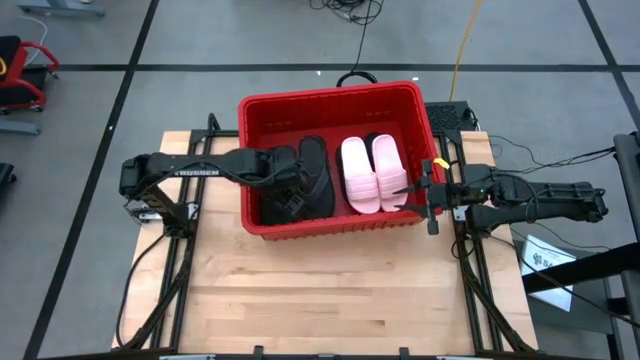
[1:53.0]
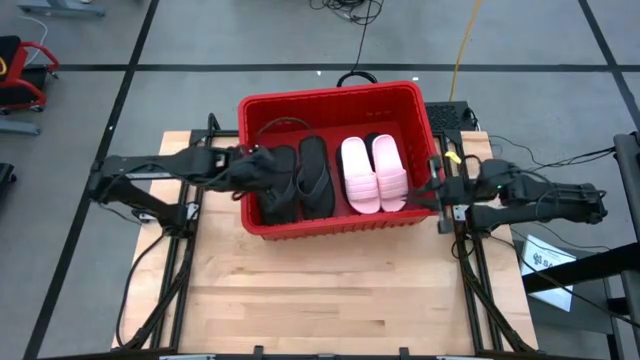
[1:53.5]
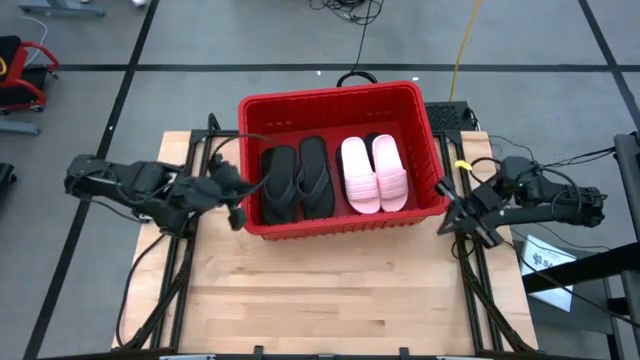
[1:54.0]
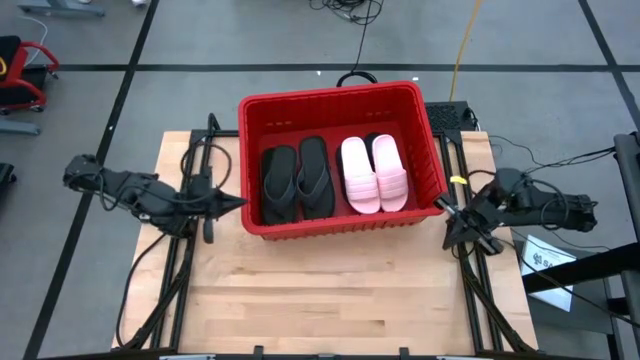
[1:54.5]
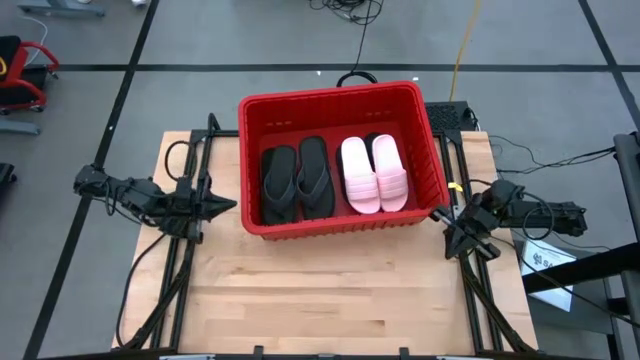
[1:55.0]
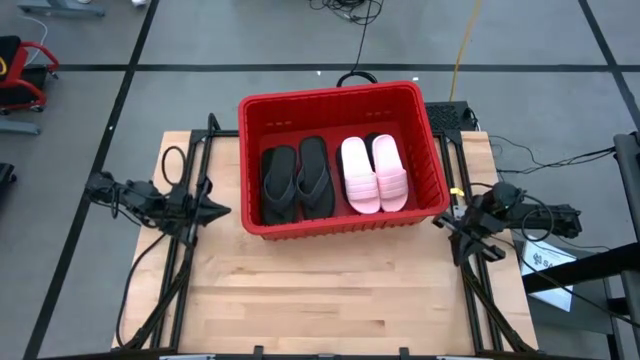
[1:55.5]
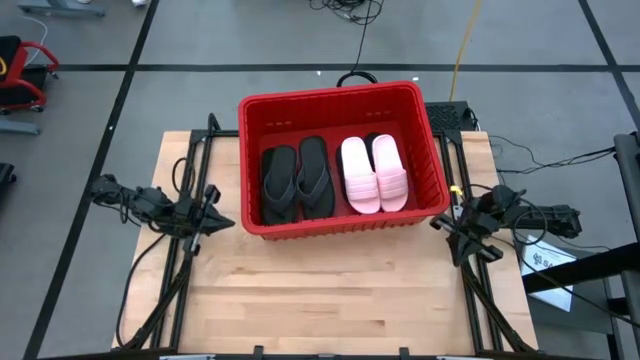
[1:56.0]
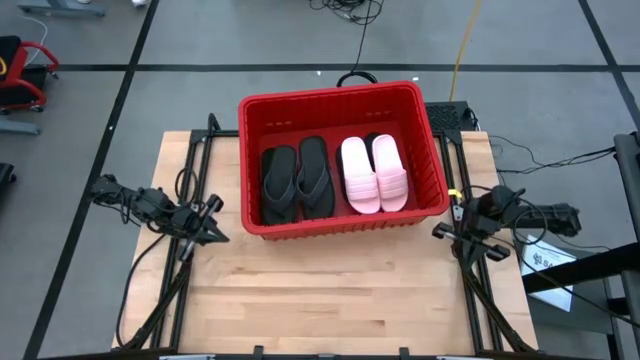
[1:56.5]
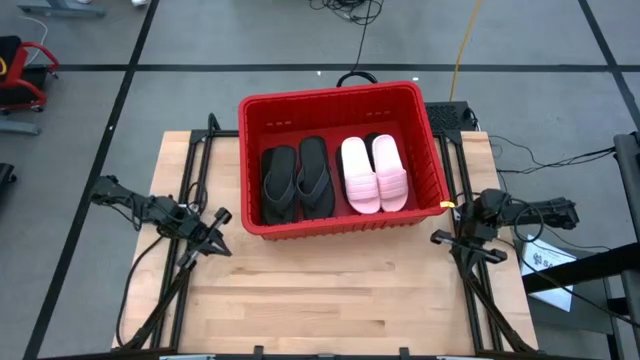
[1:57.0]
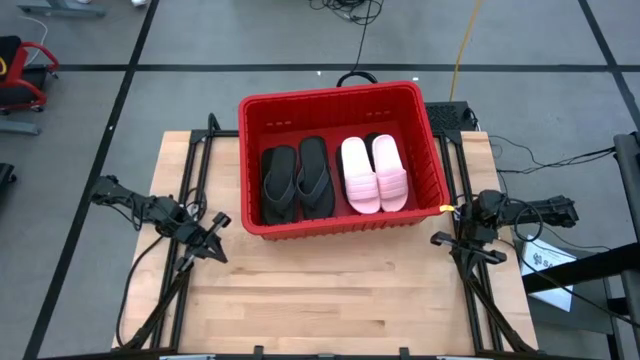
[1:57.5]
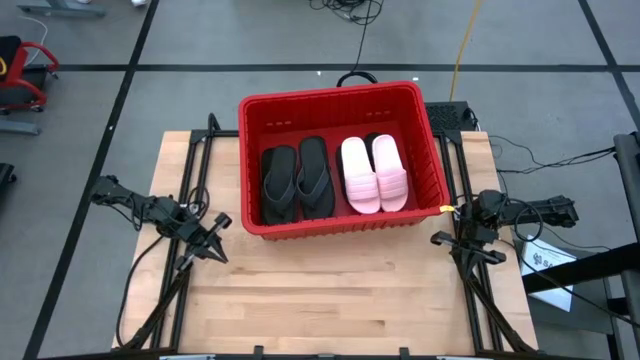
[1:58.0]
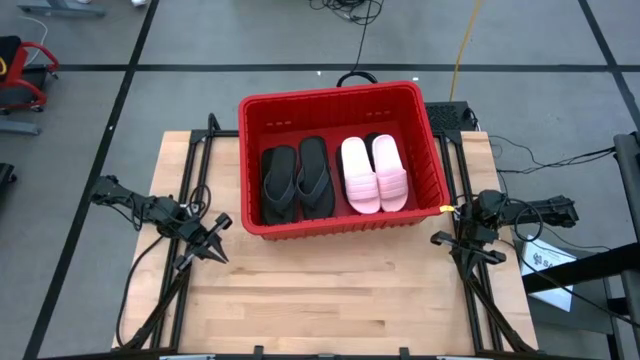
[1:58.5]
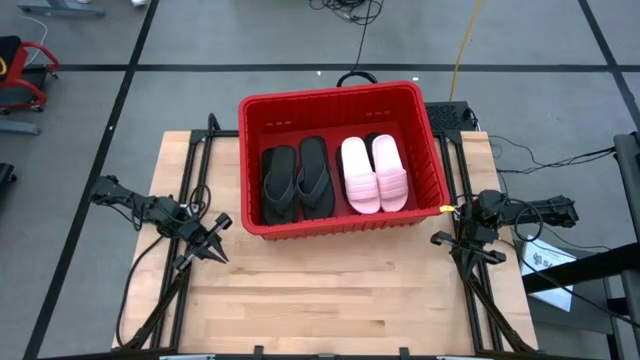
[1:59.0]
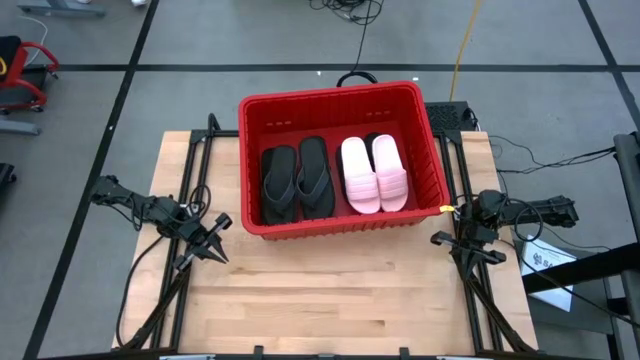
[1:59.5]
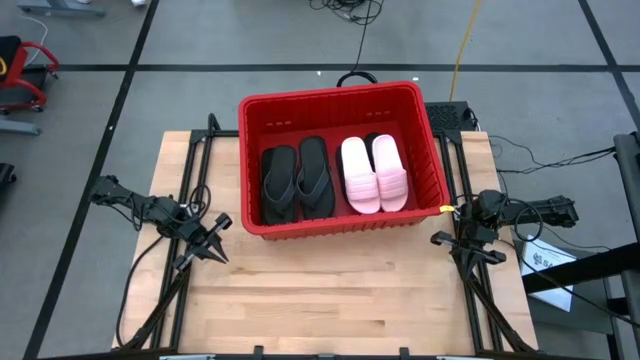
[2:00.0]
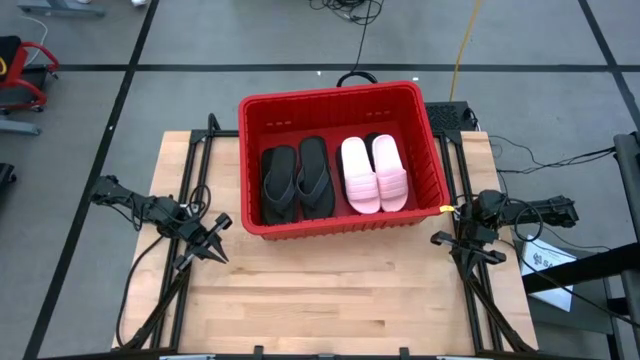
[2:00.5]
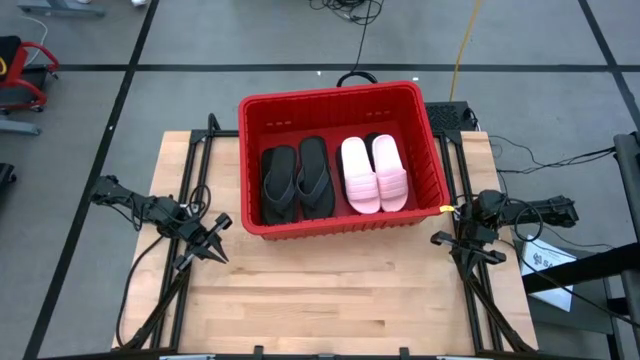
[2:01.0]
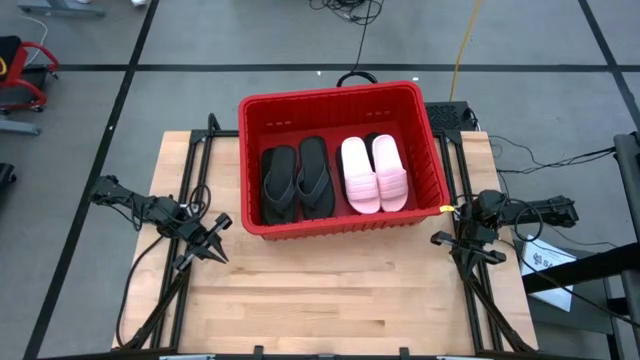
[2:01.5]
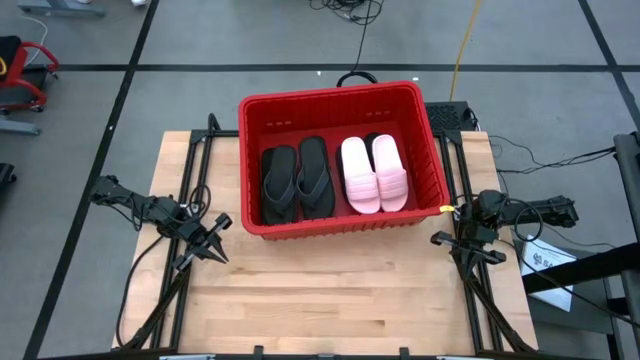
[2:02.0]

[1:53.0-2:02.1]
Task: Pick and place slides into bin
Return to Home Position

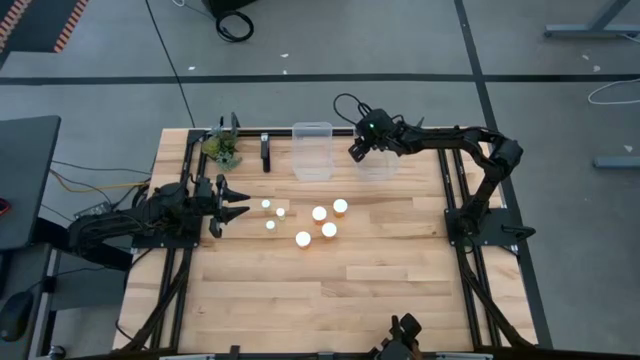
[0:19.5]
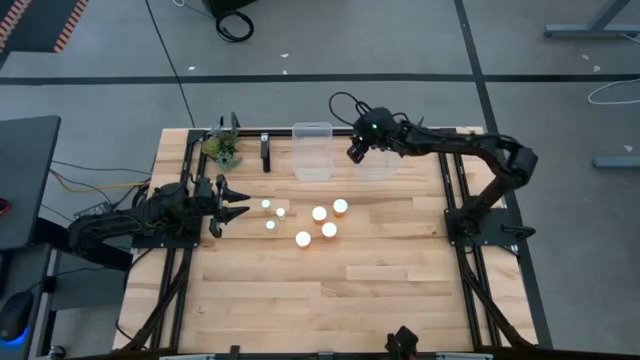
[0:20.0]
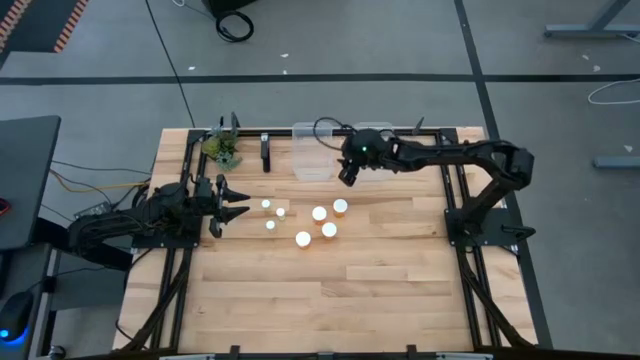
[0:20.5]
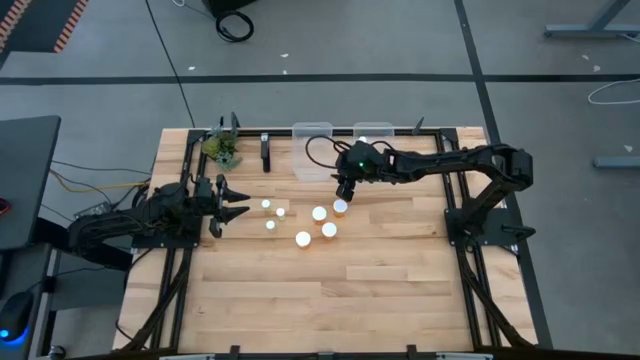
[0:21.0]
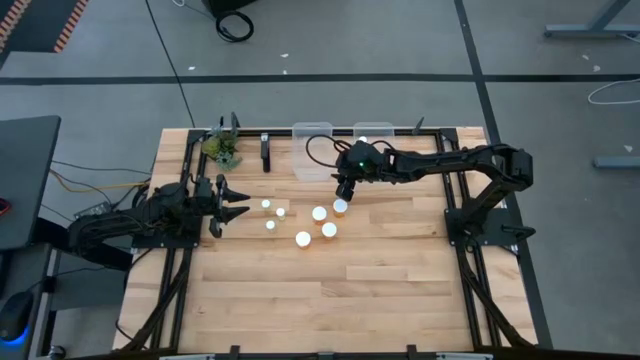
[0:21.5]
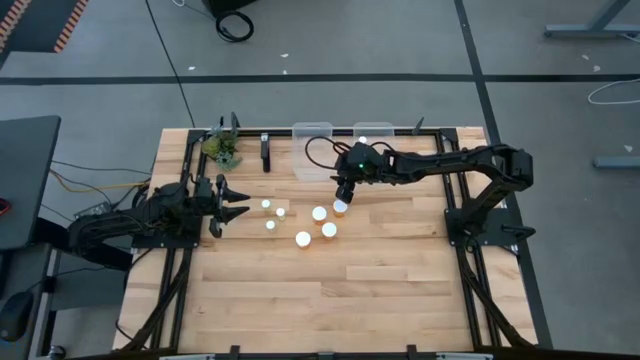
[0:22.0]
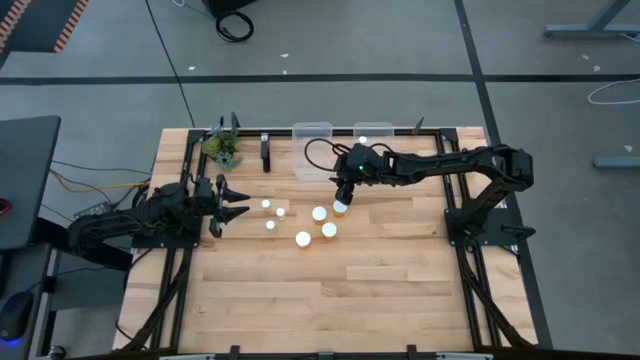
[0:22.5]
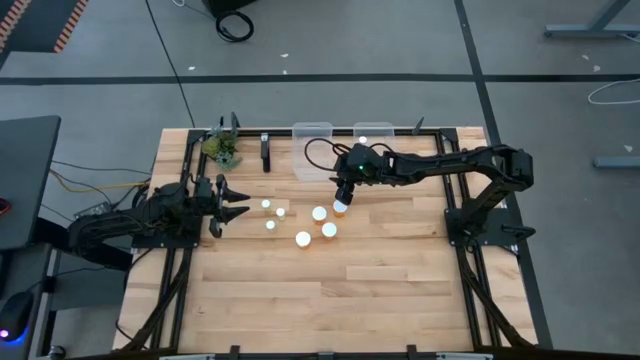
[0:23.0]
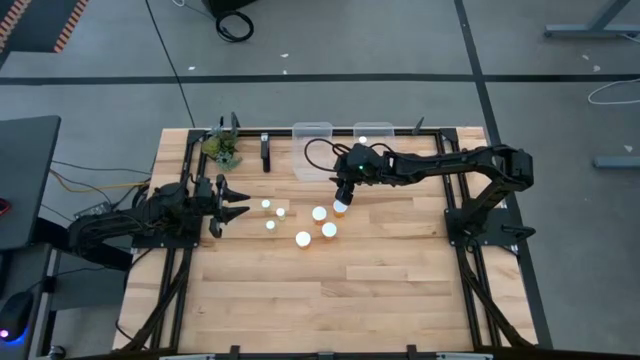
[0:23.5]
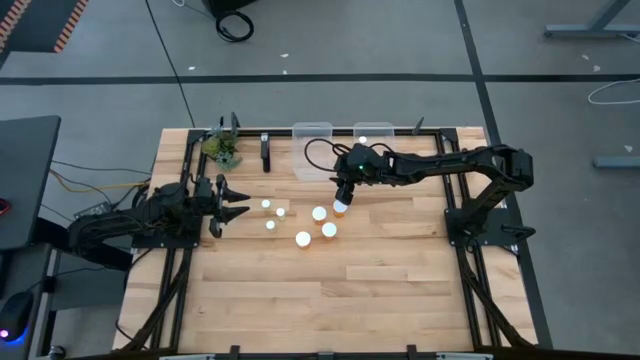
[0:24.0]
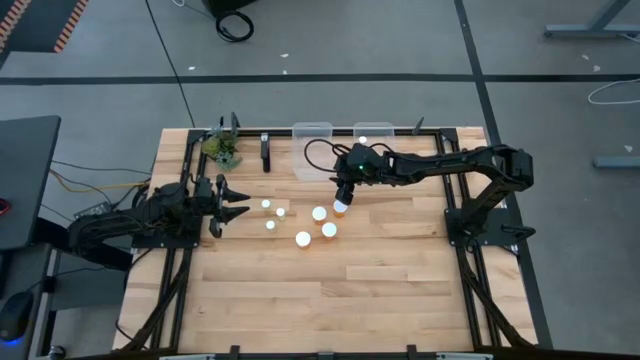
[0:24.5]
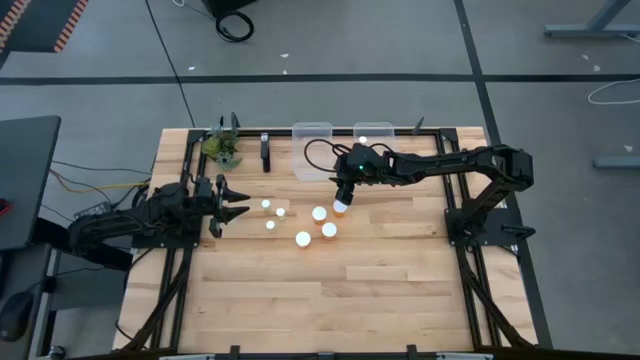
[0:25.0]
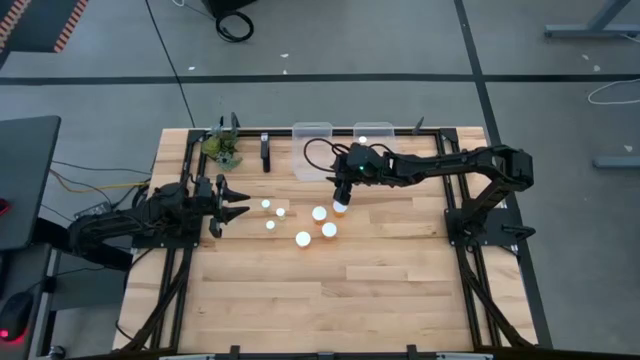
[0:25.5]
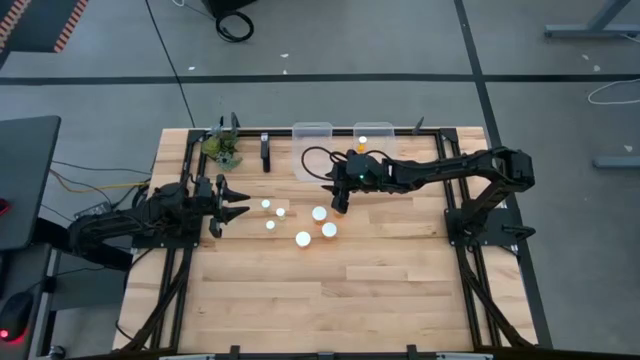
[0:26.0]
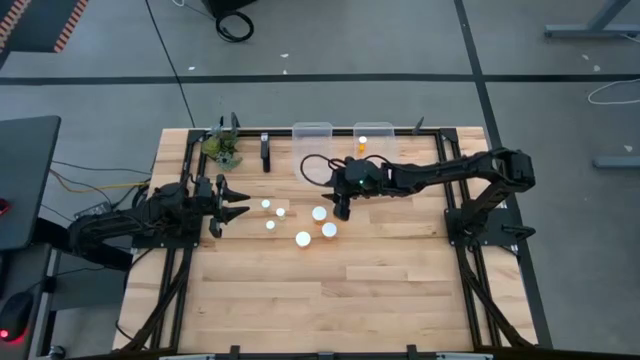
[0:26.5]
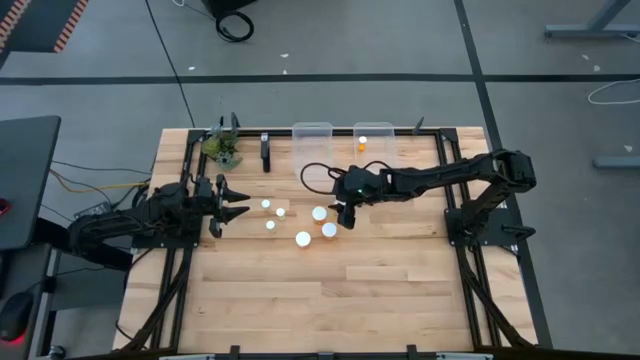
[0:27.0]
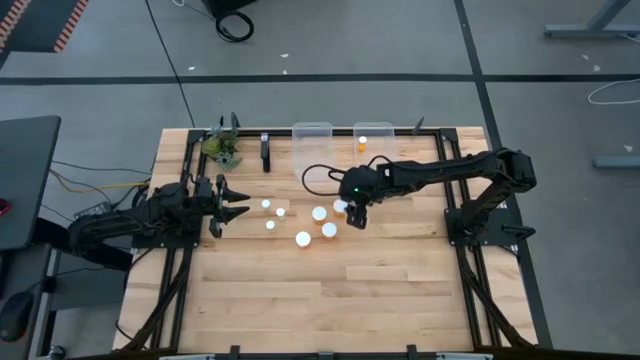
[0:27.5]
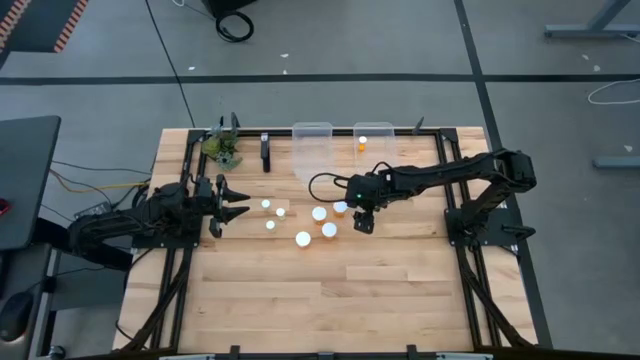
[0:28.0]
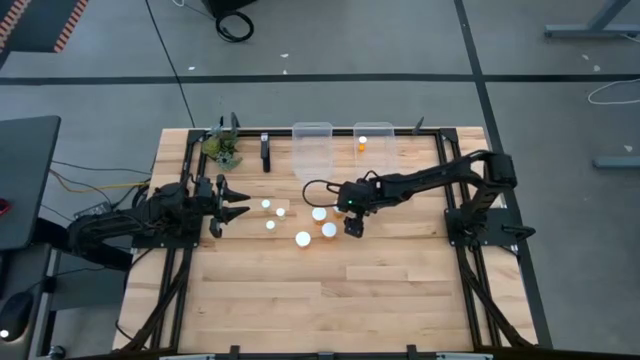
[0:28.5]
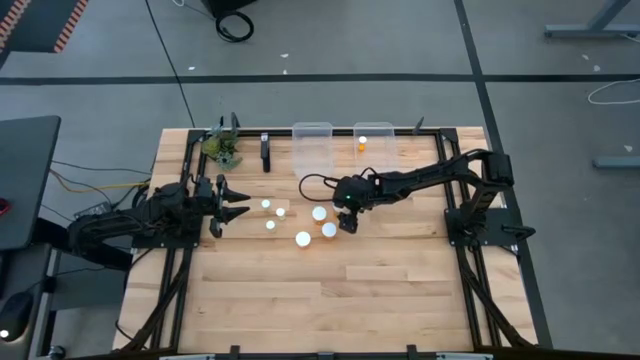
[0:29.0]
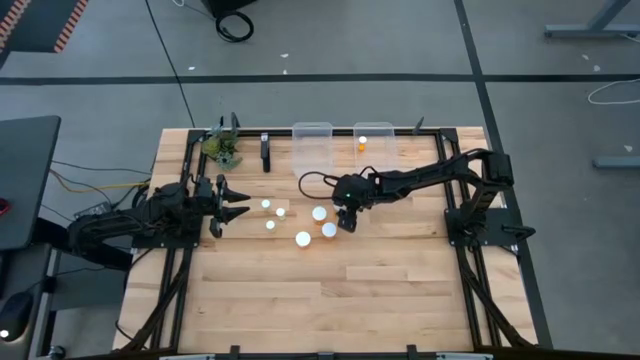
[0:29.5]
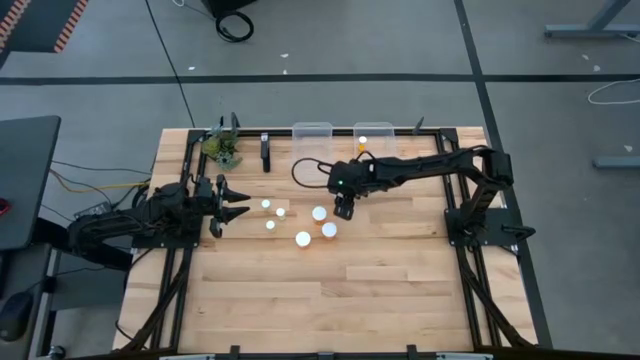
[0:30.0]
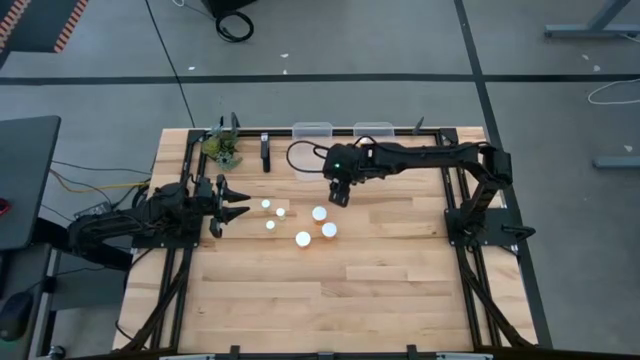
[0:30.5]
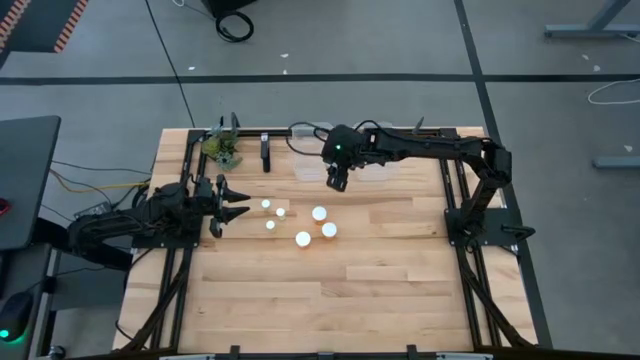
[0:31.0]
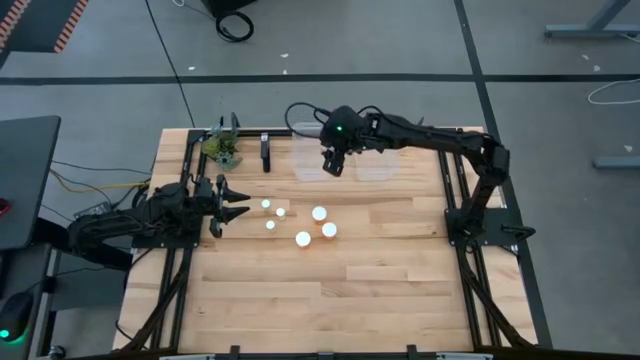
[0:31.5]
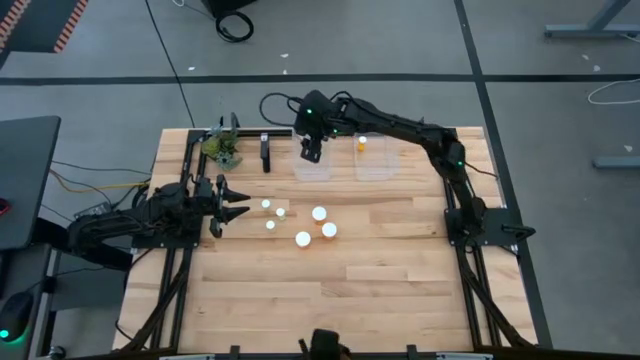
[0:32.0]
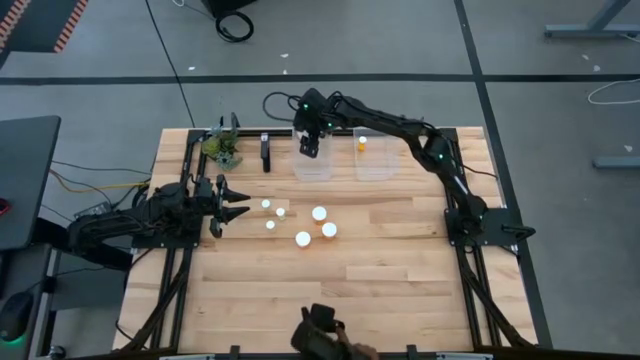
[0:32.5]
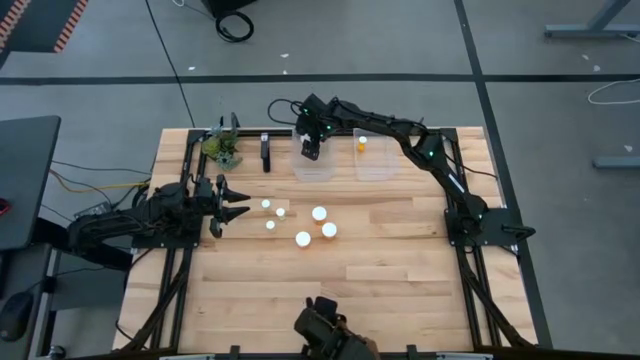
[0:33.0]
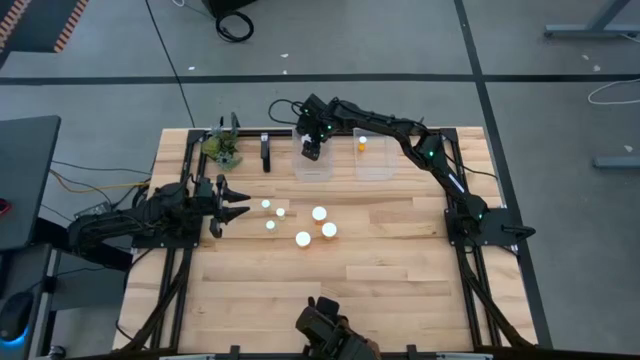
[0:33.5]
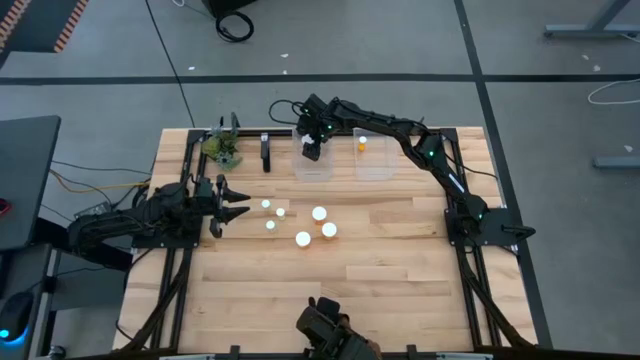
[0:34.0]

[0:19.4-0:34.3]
Task: Pick and place medicine bottles into bin by pill shape (circle, oval)
Put the large orange pill bottle into the left transparent bin
